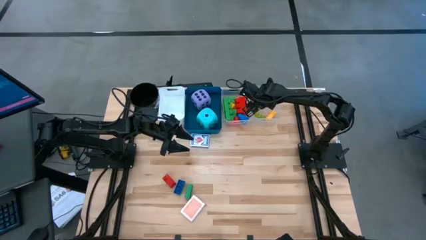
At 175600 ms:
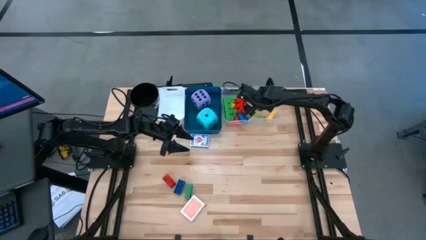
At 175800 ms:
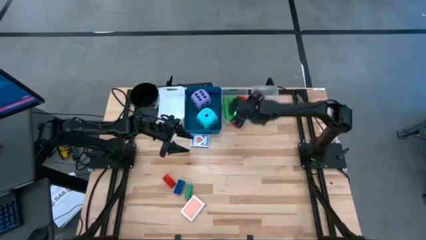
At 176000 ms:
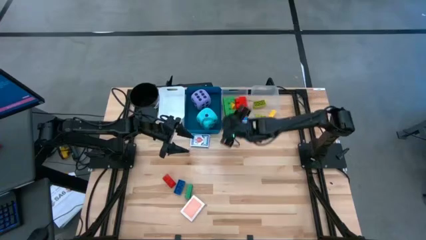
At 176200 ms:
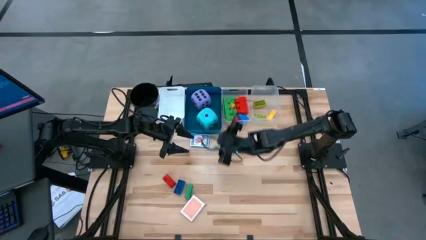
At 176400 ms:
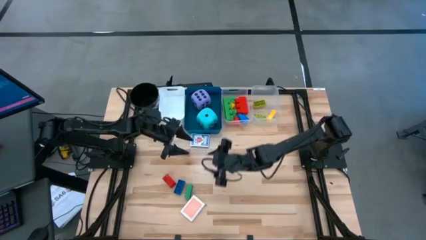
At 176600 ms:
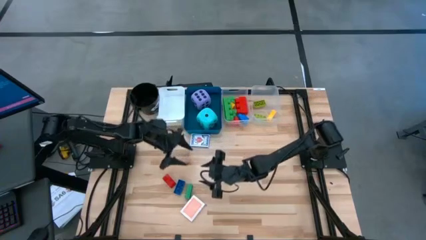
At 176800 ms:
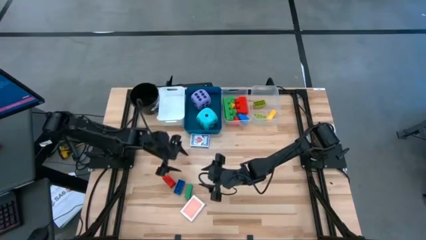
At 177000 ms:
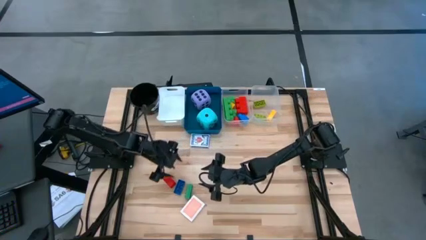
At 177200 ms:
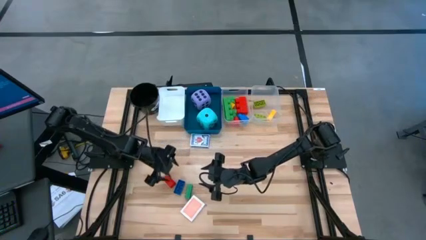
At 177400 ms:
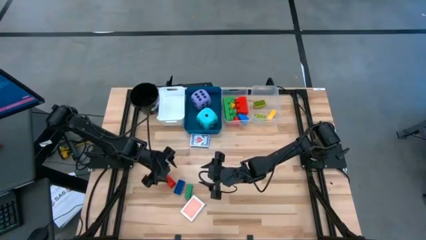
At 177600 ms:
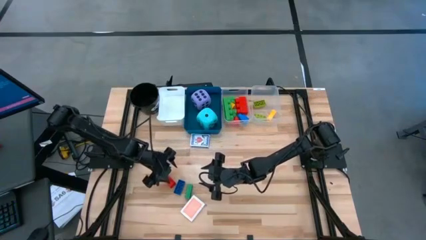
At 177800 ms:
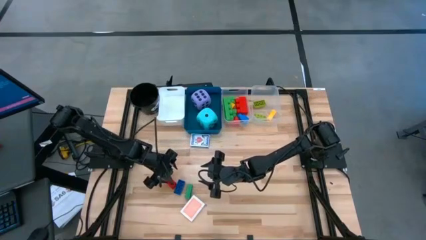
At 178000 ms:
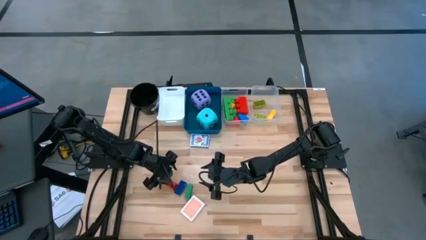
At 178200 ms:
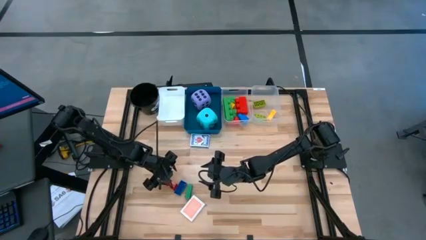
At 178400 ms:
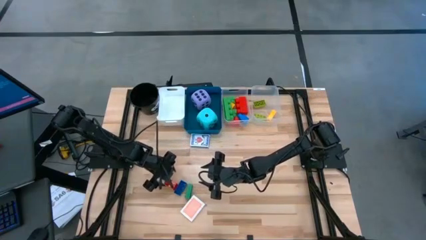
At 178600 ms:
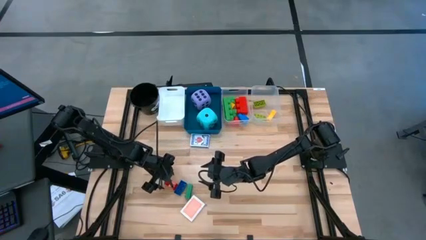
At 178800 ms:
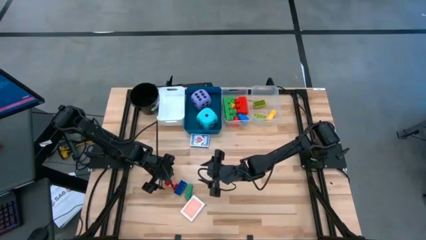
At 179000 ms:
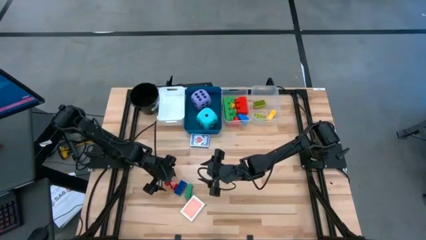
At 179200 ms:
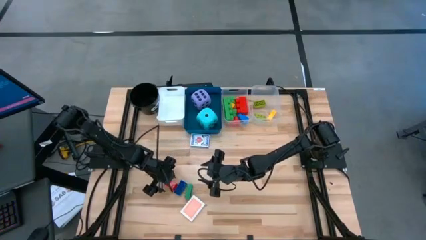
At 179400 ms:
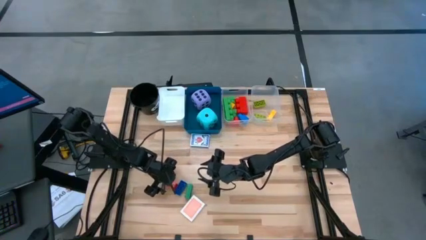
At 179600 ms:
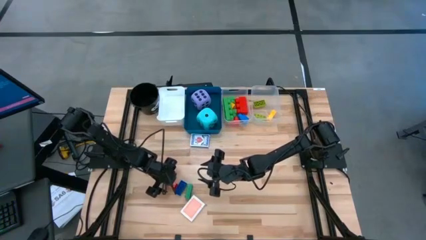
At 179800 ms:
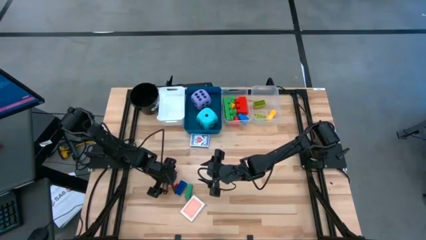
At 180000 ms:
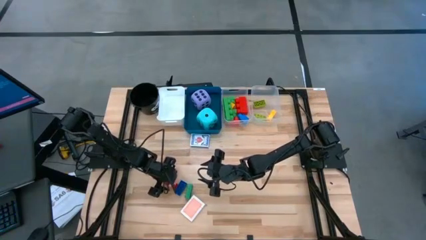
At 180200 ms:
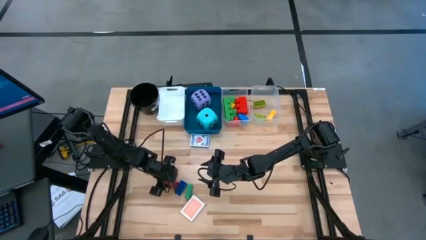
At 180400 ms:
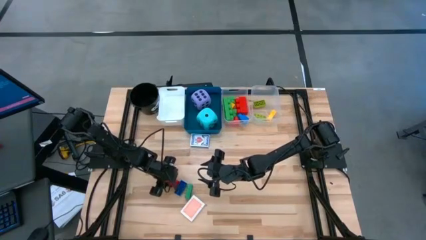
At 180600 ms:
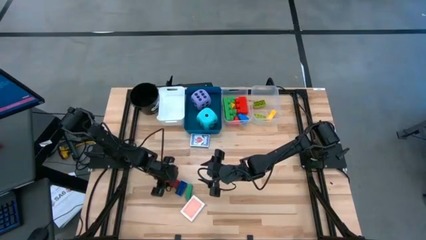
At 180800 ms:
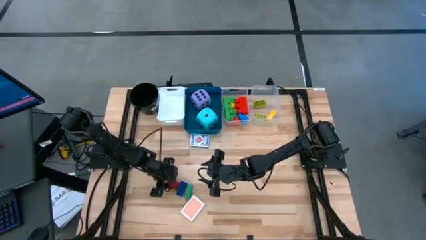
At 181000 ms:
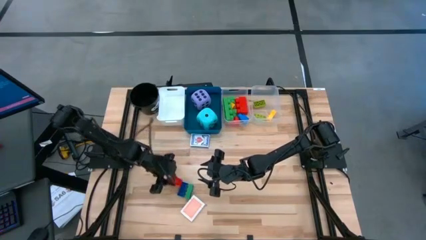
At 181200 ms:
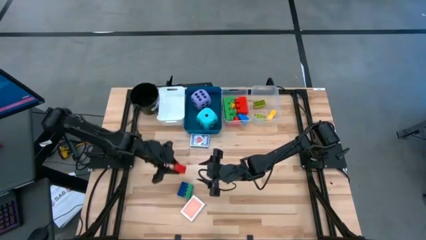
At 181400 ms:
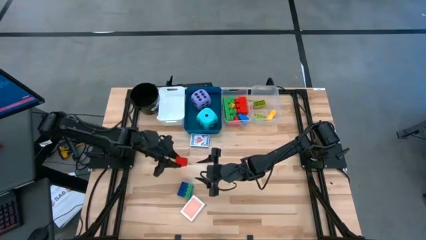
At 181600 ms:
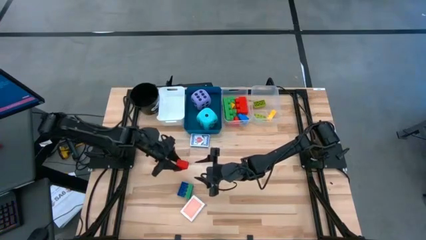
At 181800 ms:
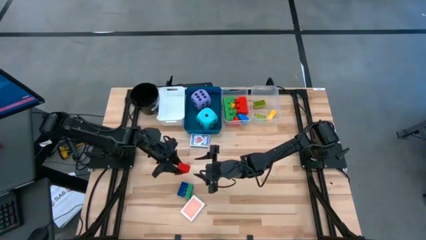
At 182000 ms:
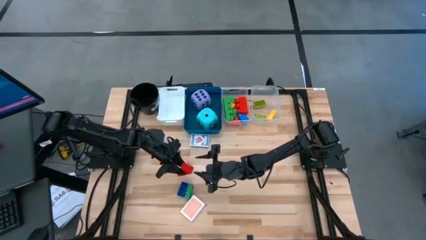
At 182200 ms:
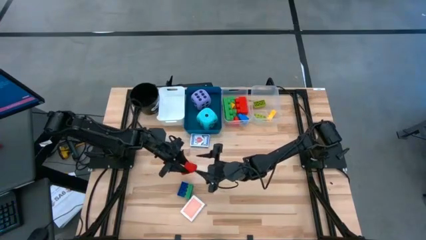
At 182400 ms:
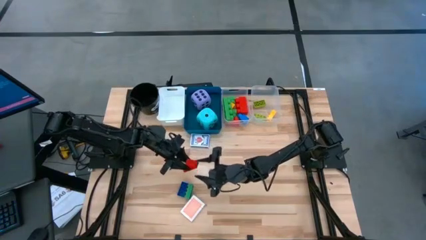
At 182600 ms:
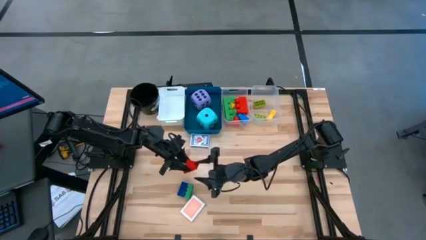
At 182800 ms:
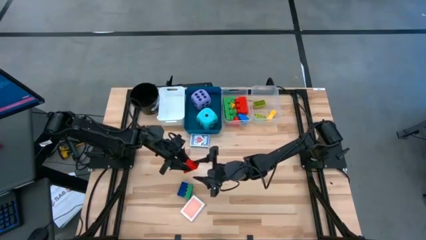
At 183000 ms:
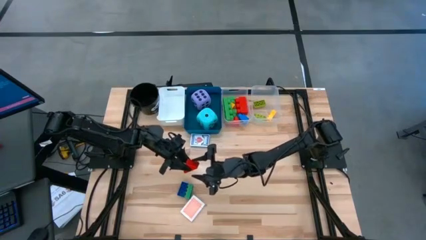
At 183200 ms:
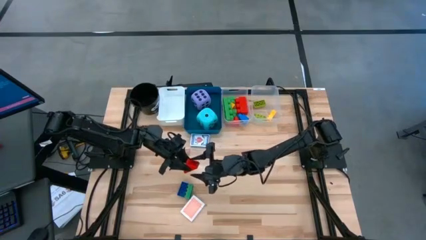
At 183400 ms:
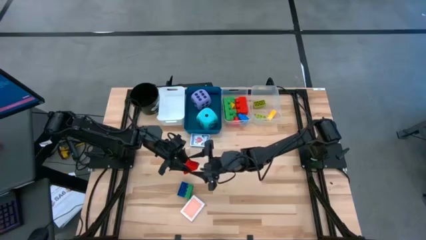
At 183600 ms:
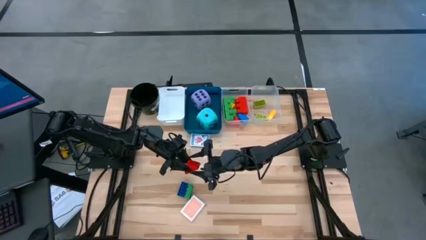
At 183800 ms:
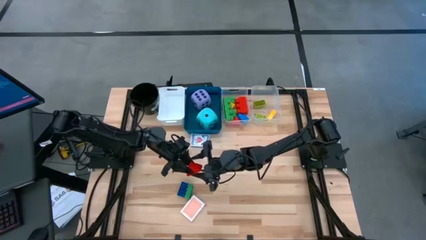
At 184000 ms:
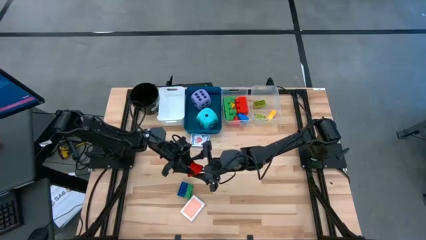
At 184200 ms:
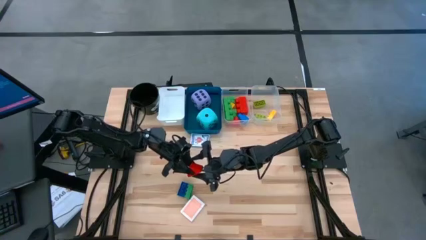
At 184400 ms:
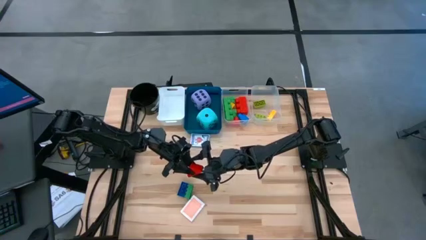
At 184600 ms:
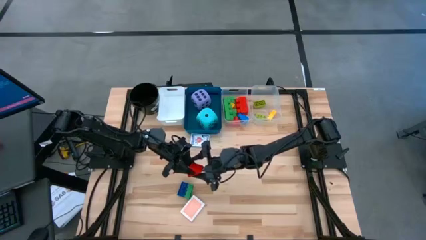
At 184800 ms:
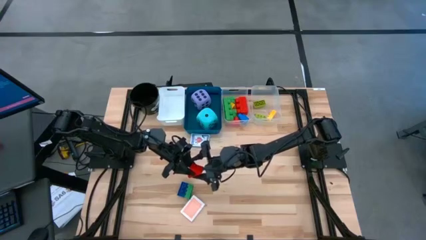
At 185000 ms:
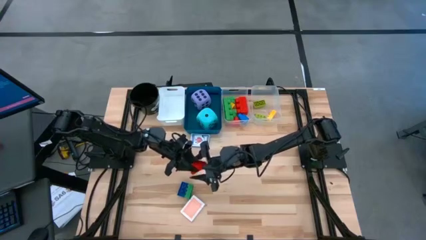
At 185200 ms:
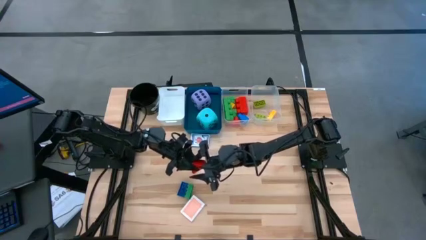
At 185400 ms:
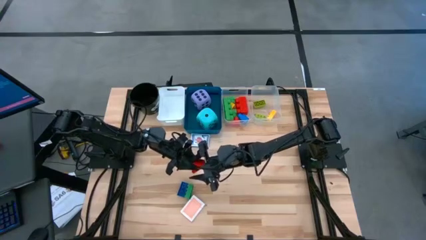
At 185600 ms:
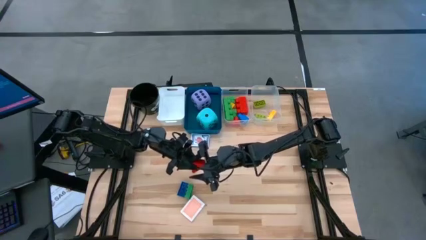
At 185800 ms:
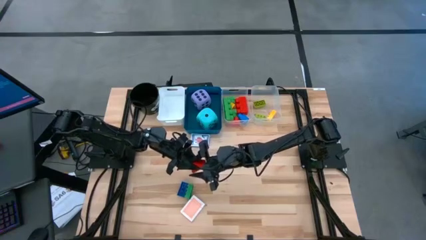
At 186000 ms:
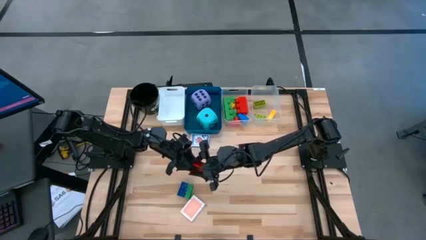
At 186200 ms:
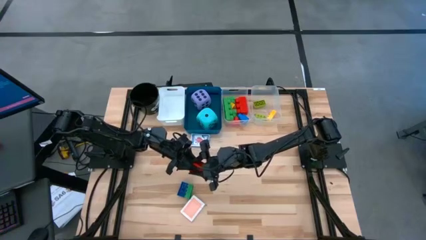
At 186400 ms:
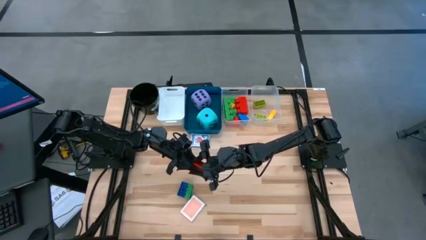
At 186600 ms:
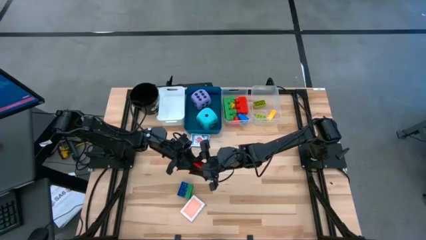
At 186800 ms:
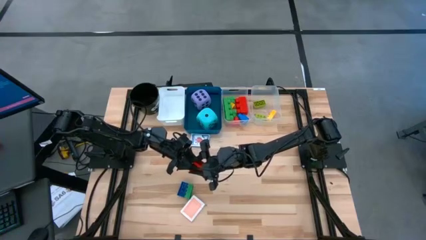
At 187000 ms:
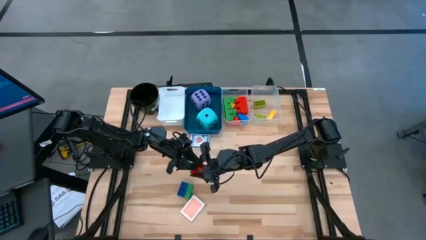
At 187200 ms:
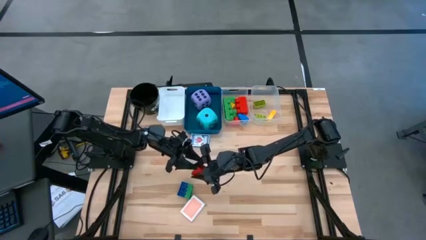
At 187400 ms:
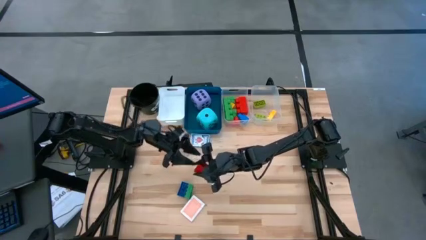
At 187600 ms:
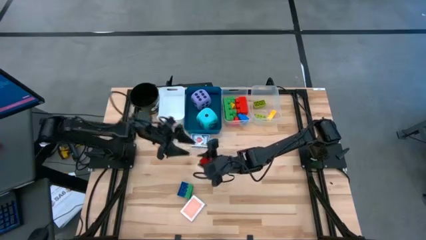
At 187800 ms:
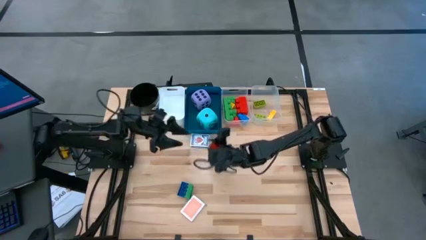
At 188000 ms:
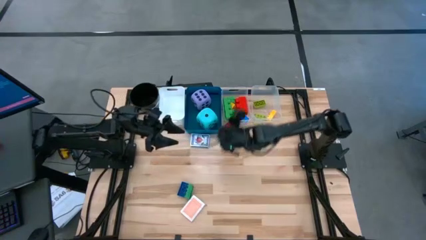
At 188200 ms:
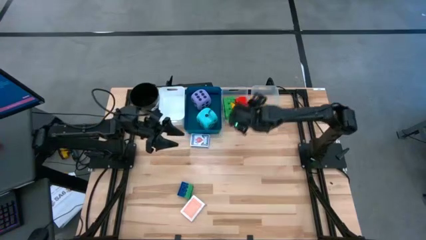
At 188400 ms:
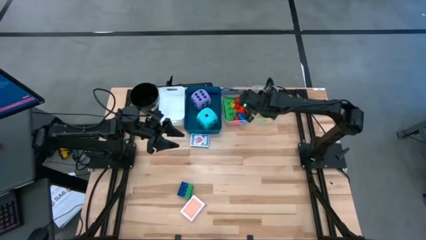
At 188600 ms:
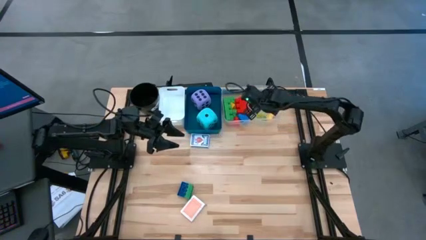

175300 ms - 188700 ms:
Task: Pick & Place Toys
Put the orange triangle blocks into the right transparent bin

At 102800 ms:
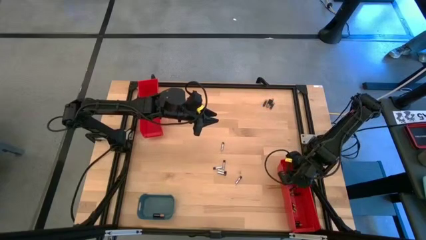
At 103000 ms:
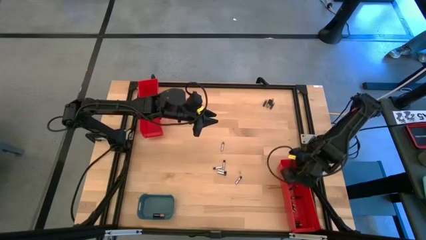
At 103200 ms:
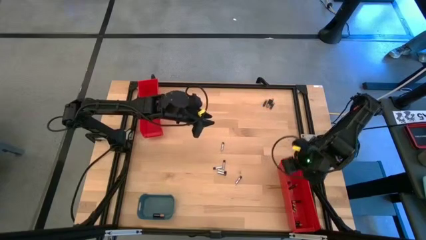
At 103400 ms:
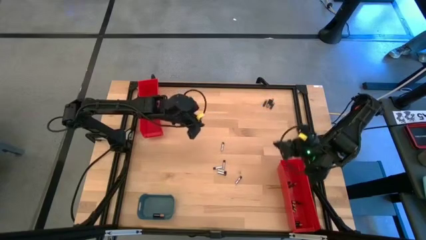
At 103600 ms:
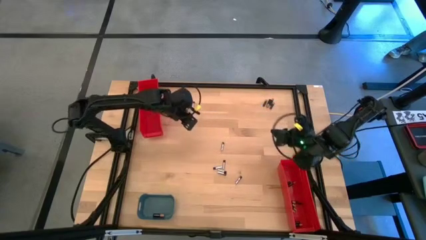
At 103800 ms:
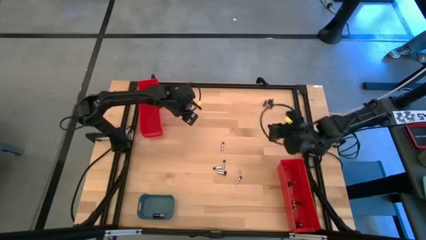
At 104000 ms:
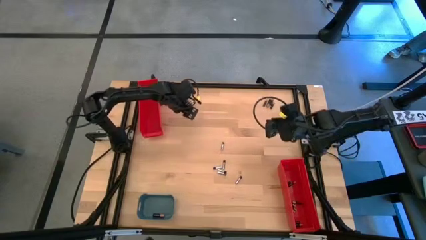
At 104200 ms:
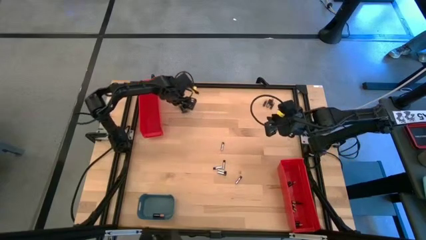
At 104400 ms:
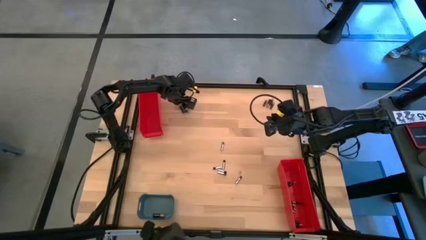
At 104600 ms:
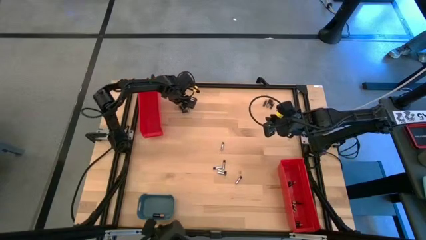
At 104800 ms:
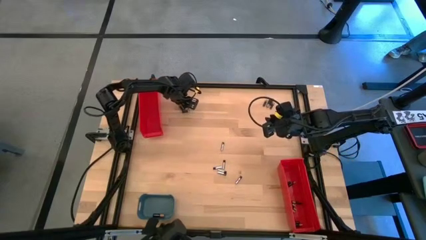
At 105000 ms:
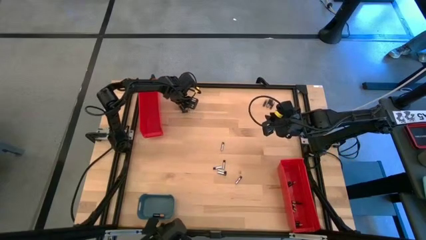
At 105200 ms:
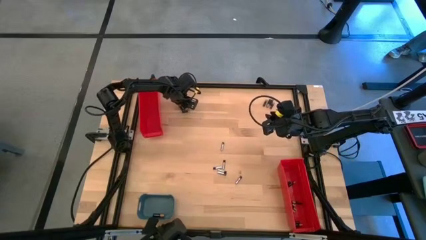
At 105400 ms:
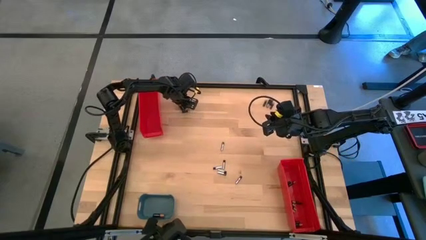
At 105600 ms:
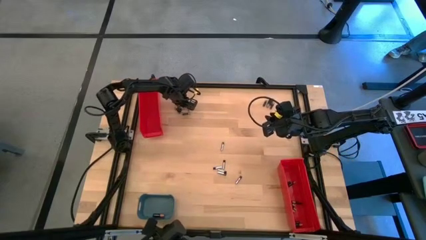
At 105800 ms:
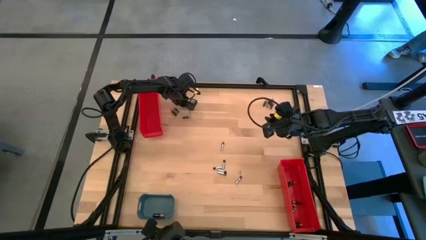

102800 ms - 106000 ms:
Task: Sort batteries
Put the large black battery into the blue bin
